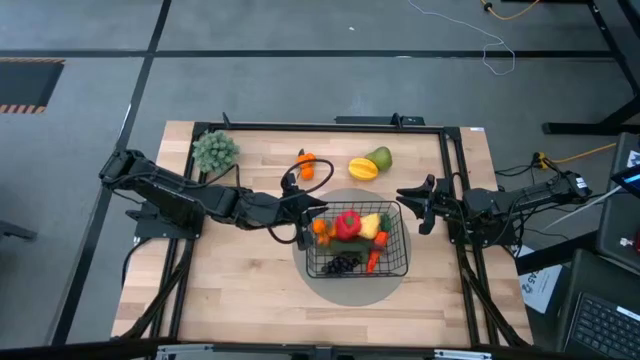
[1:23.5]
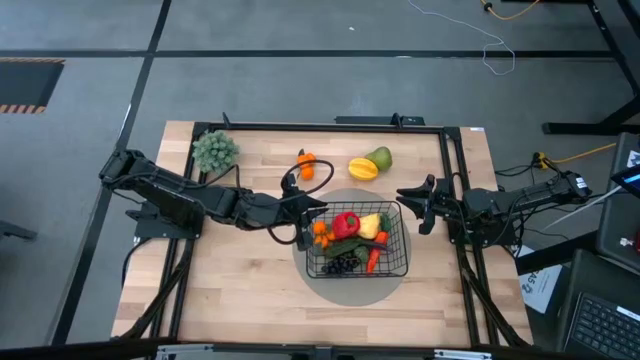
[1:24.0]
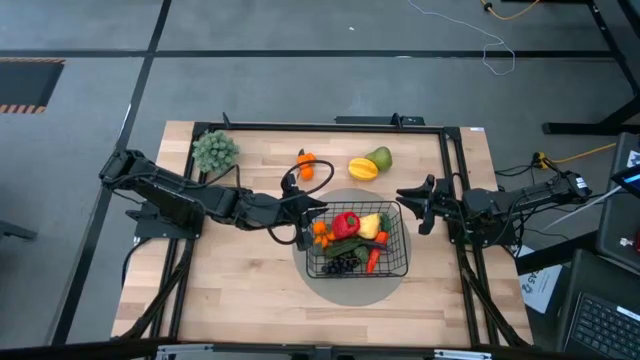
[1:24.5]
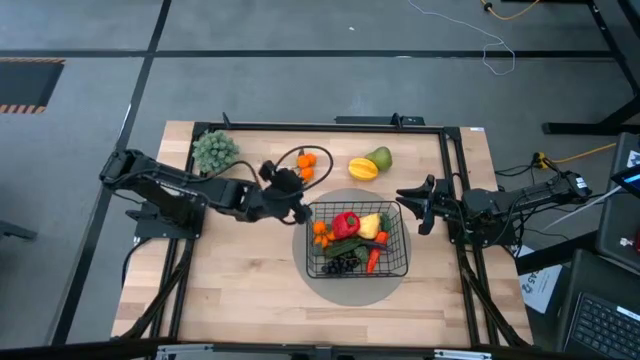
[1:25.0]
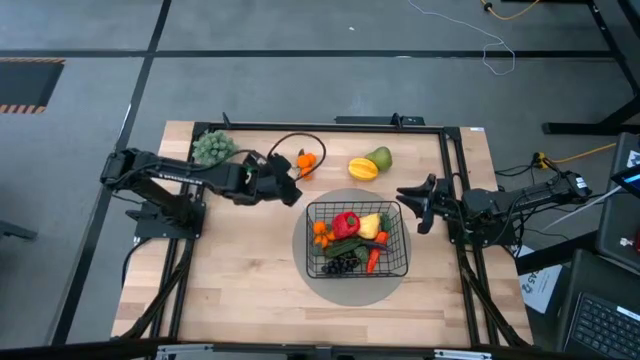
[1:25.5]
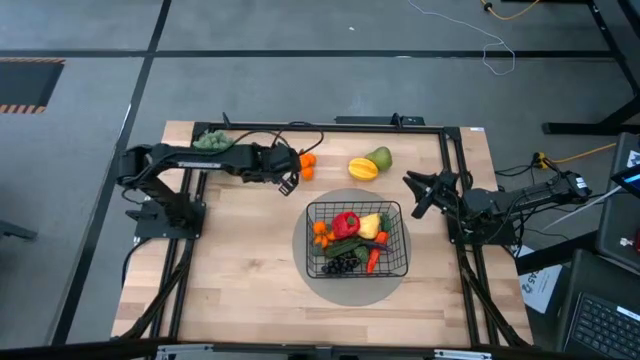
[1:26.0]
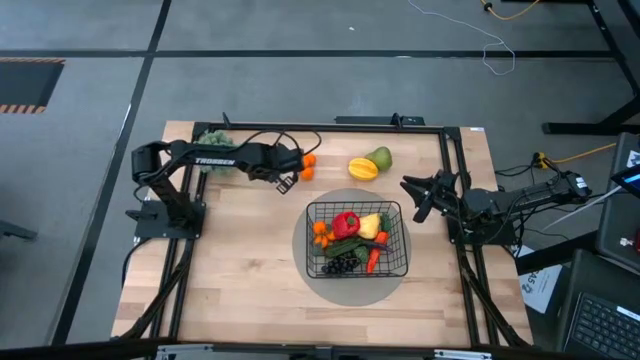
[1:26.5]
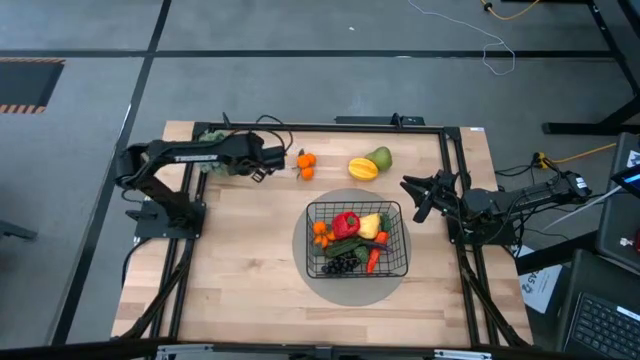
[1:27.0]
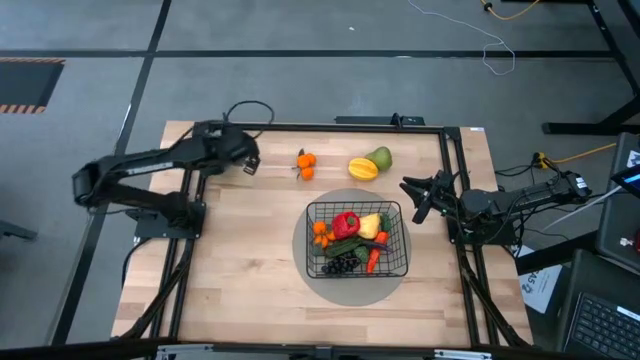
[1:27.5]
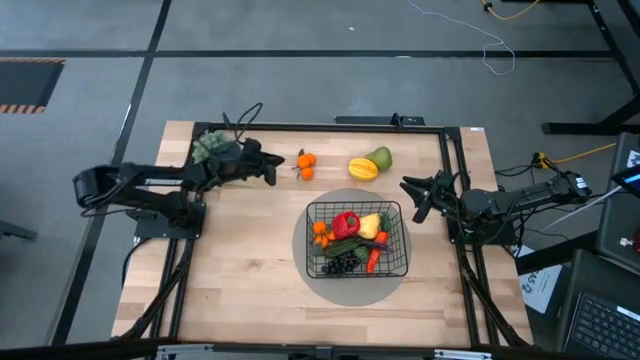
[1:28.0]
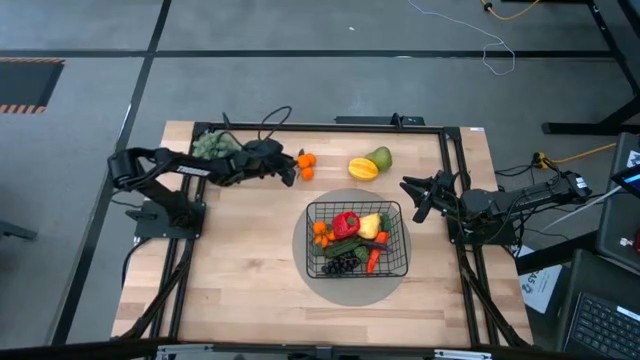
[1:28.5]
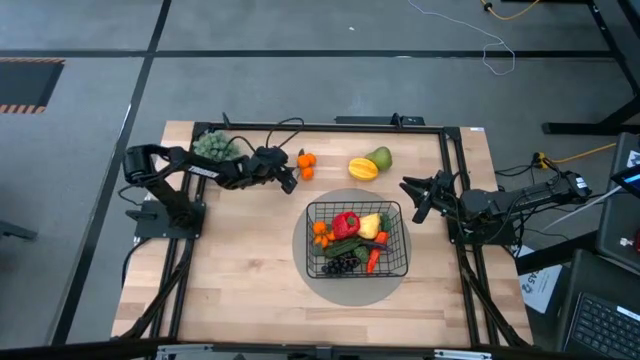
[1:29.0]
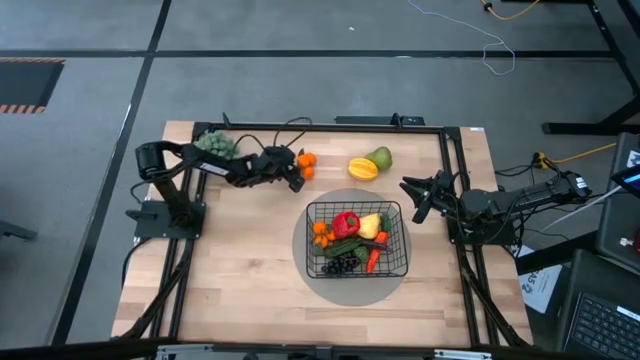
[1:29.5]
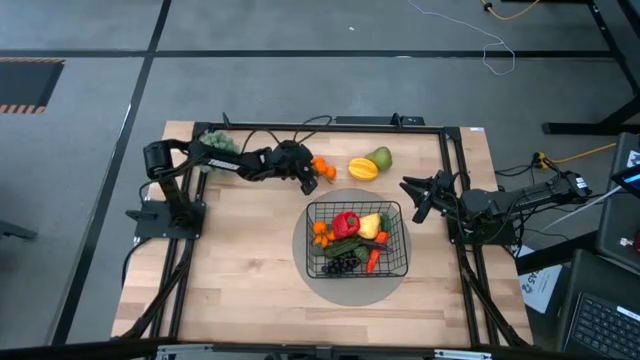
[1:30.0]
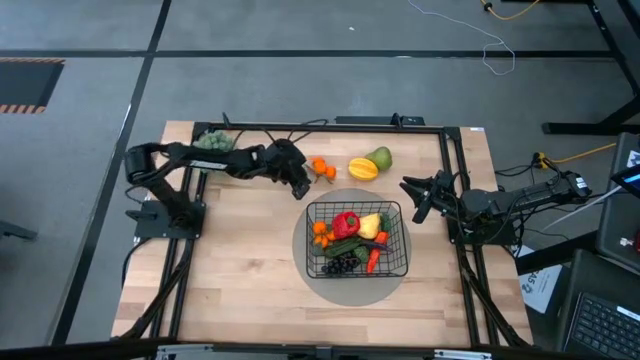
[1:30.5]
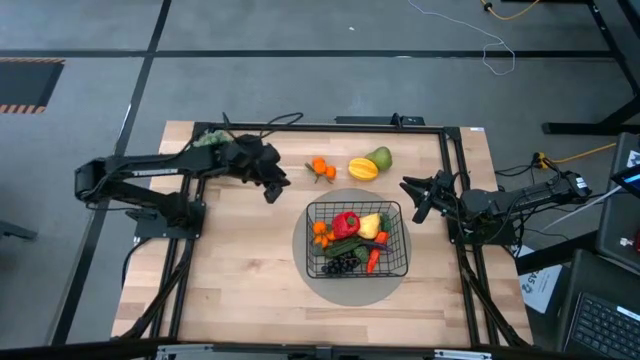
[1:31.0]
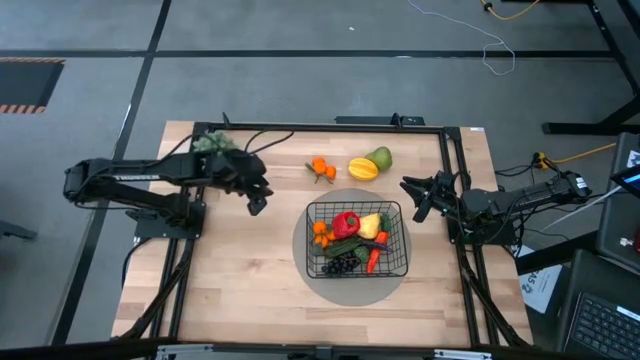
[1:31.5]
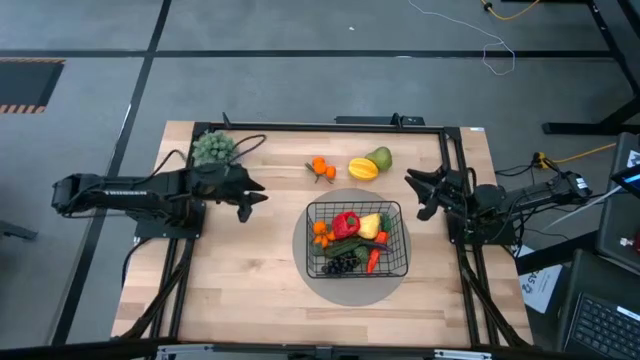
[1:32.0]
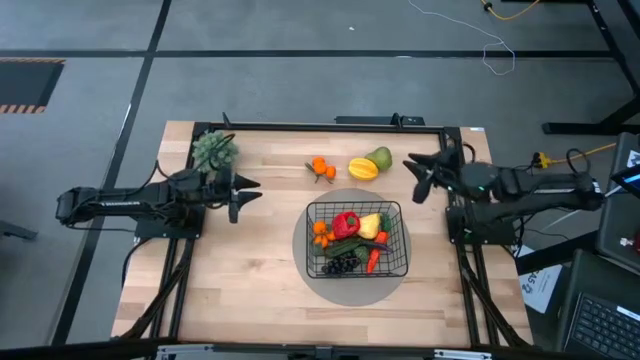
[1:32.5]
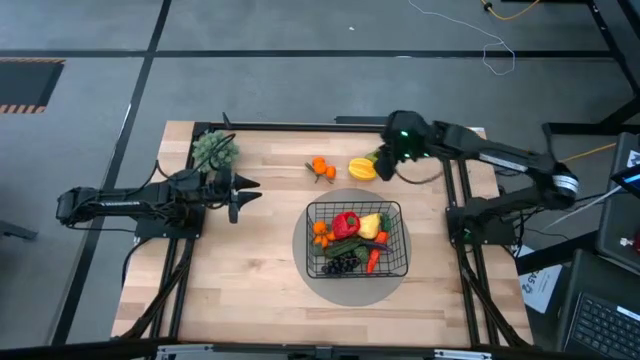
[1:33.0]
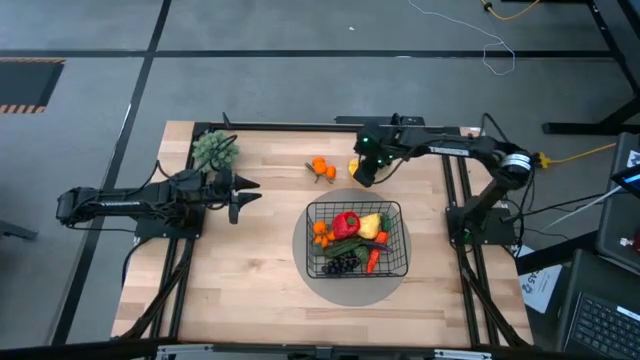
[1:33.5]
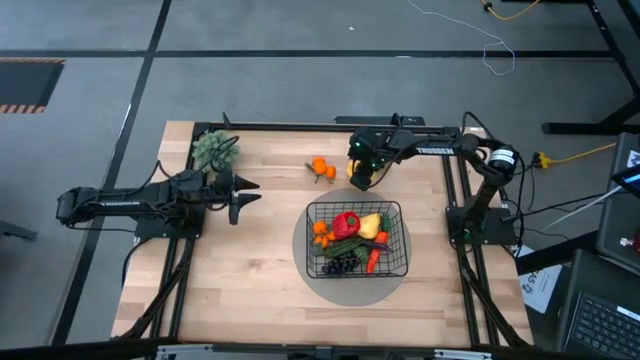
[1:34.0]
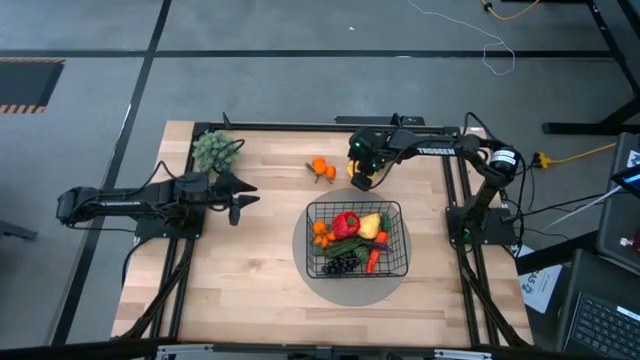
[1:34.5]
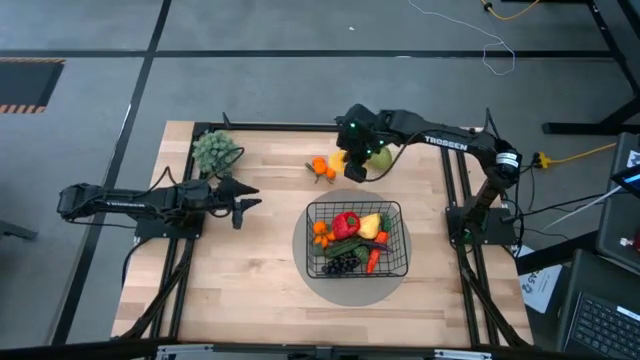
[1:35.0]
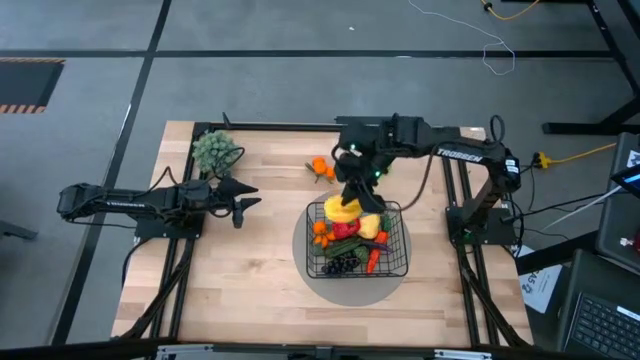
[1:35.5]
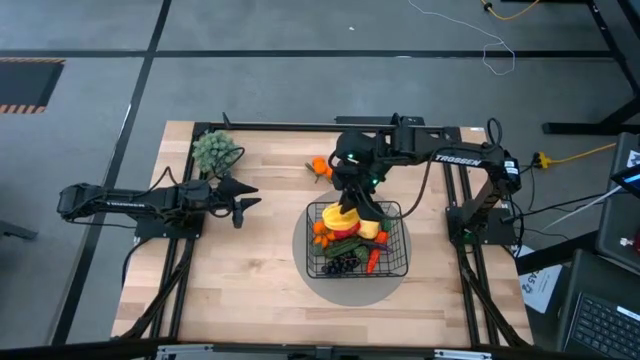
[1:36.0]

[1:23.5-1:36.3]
Task: Build produce basket
Put the yellow starfruit into the black wire basket

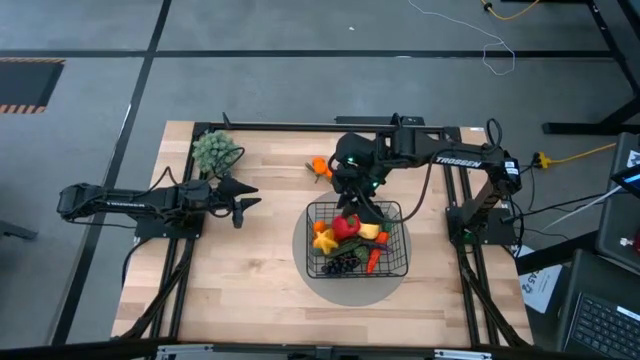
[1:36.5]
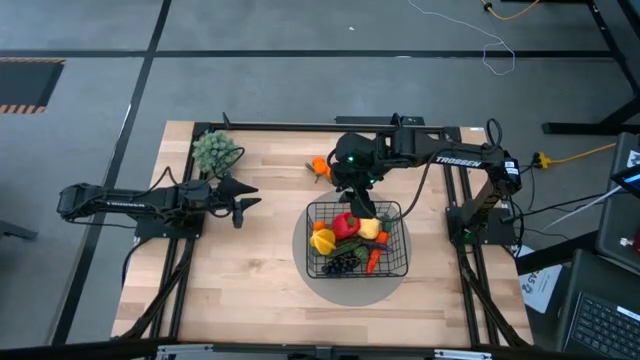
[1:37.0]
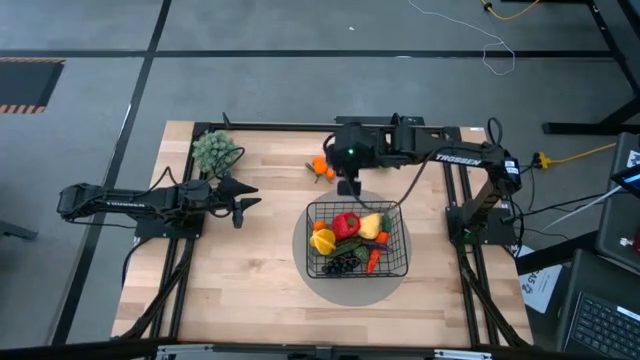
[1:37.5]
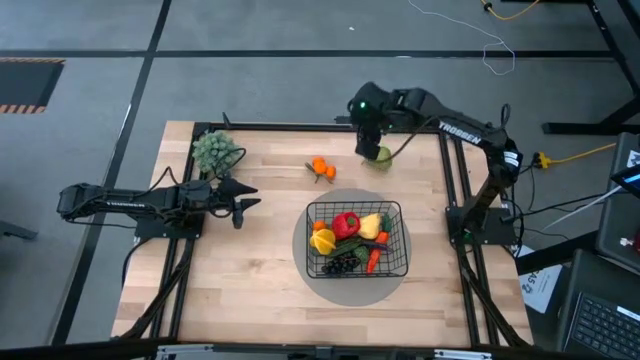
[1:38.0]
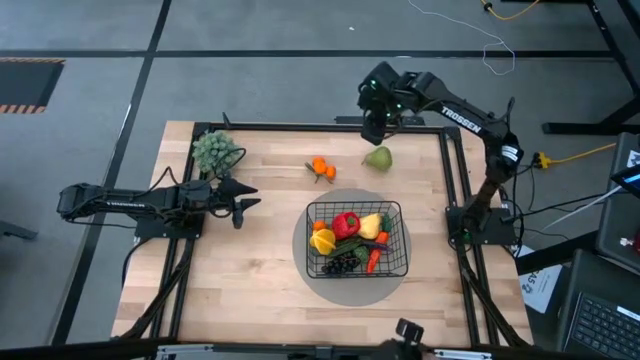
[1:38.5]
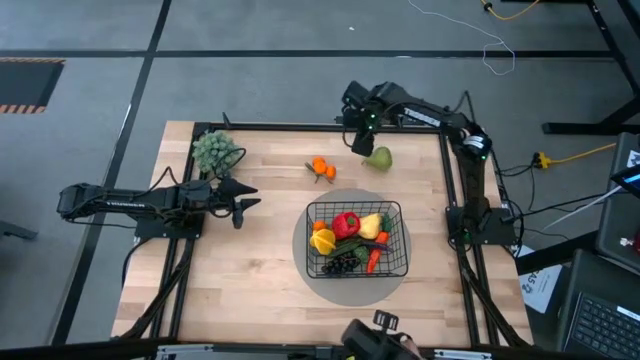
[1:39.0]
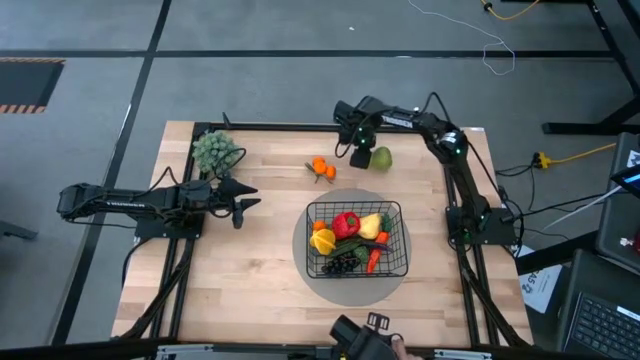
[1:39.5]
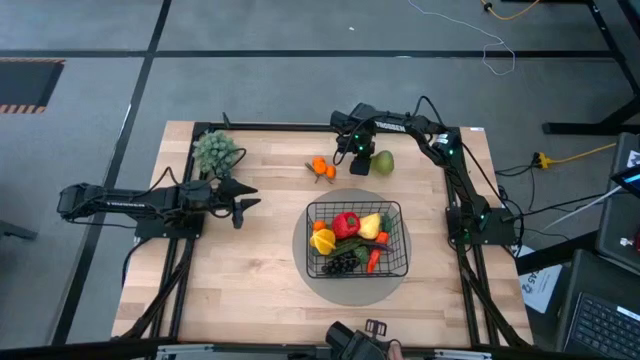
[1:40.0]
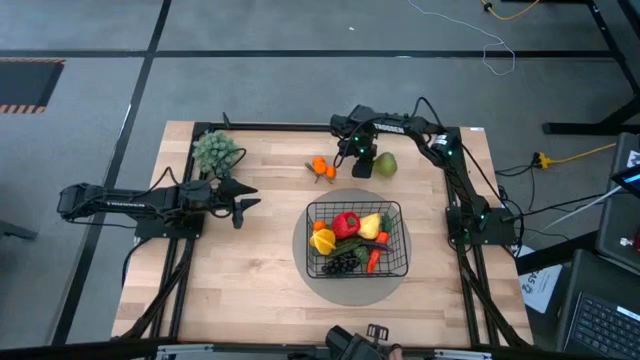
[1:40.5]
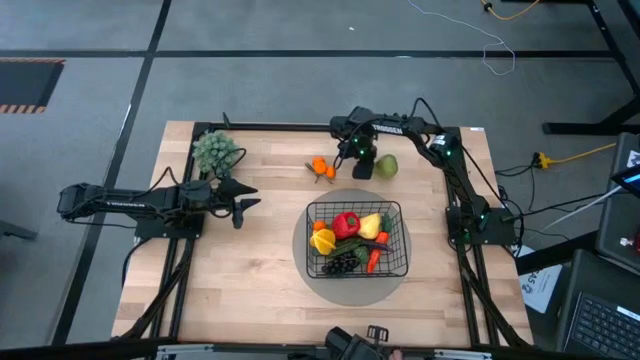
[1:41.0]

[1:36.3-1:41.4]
Put the green pear into the black wire basket

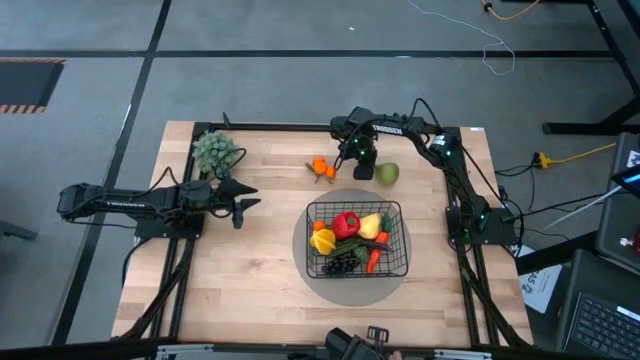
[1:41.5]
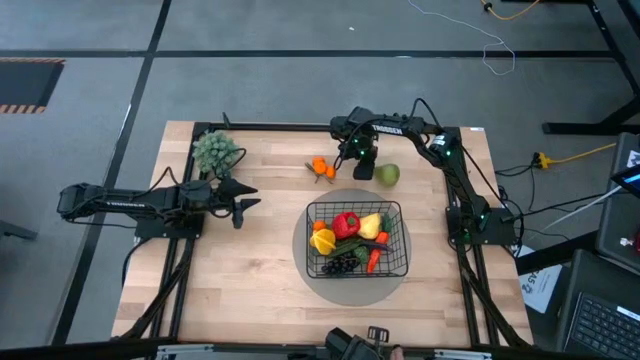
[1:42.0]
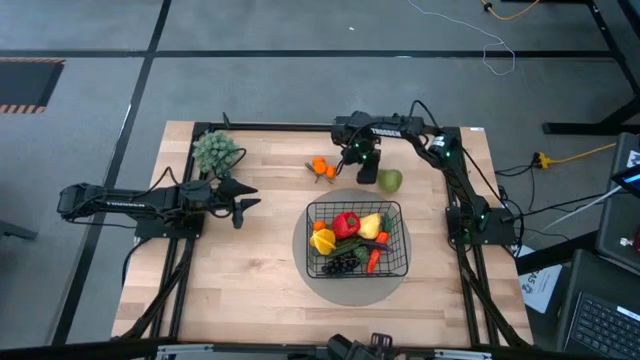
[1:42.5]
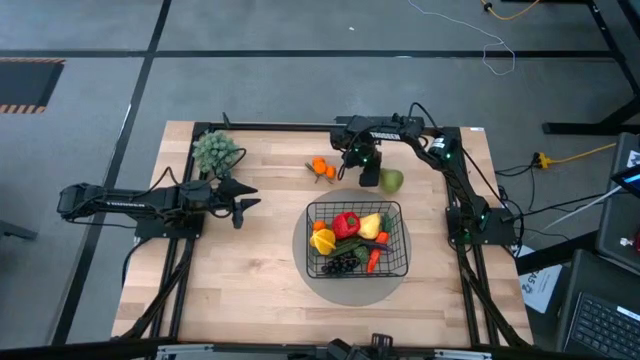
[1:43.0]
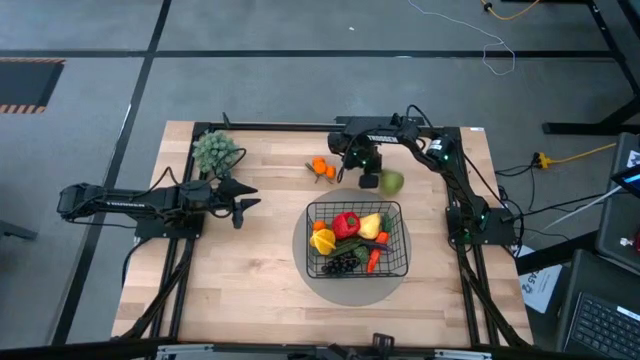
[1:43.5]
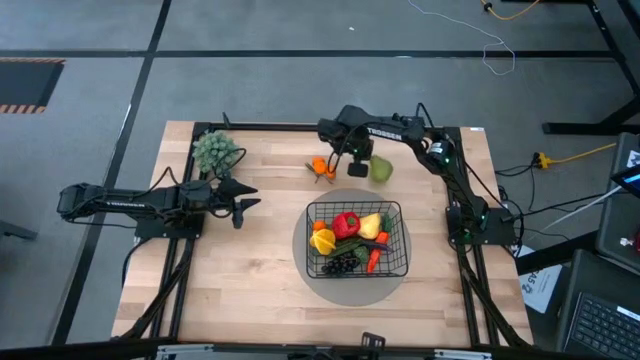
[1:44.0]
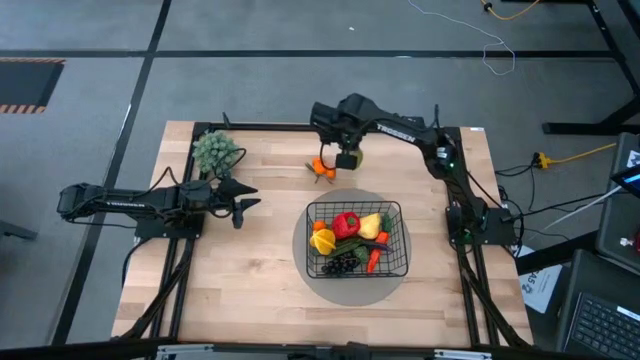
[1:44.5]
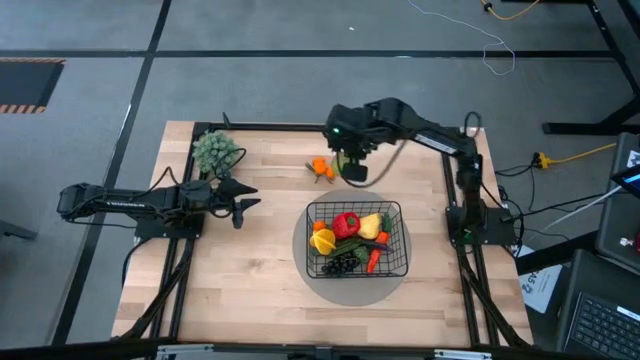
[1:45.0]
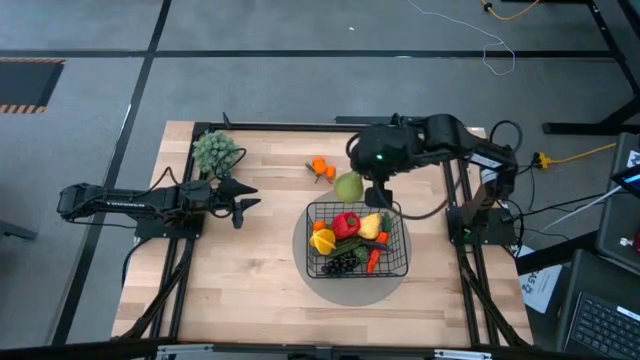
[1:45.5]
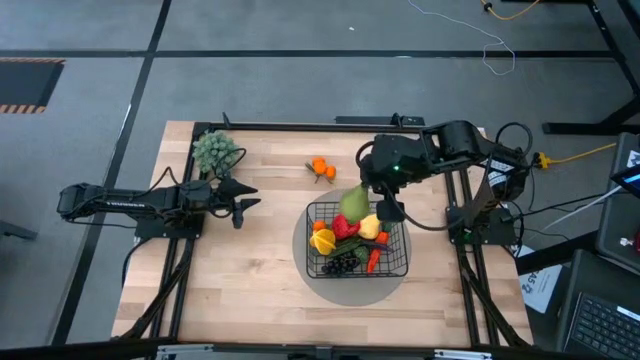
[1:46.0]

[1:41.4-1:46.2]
Put the green pear into the black wire basket
